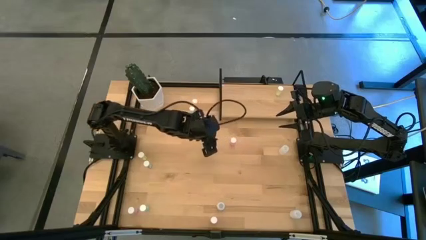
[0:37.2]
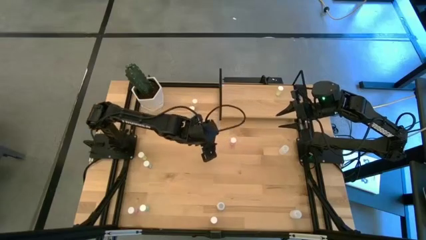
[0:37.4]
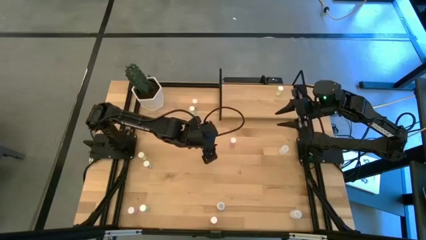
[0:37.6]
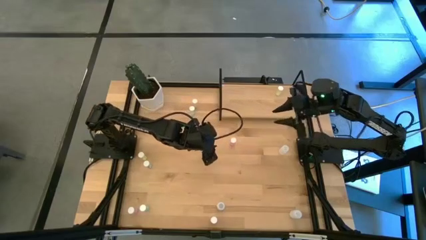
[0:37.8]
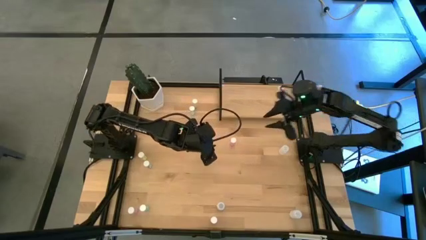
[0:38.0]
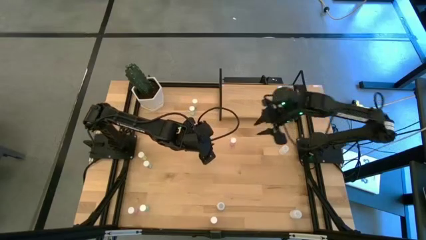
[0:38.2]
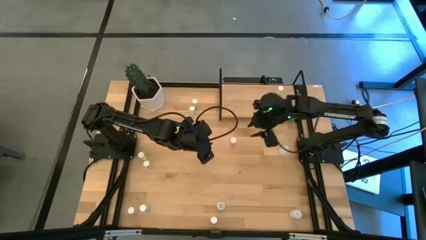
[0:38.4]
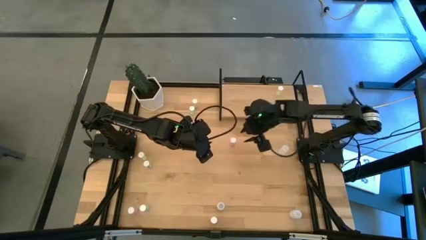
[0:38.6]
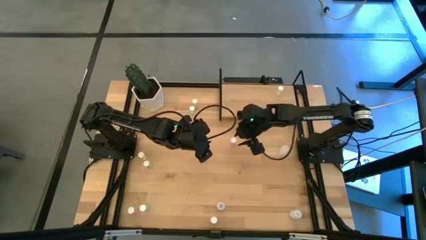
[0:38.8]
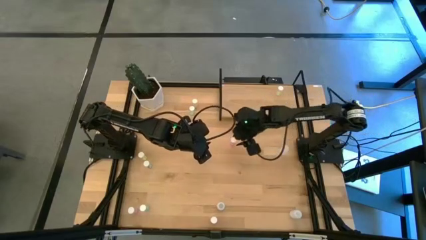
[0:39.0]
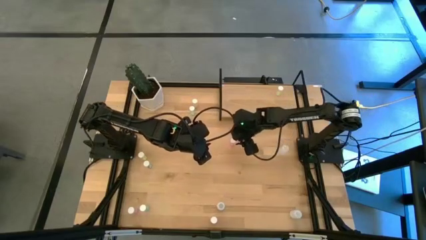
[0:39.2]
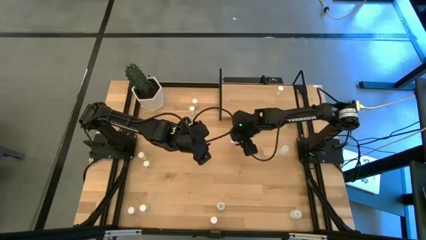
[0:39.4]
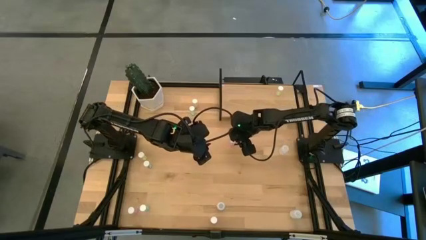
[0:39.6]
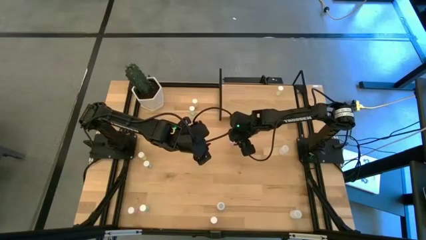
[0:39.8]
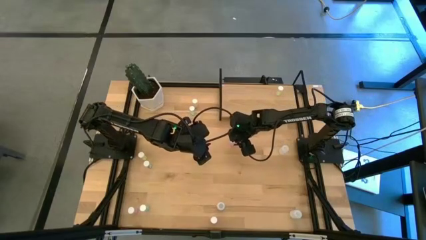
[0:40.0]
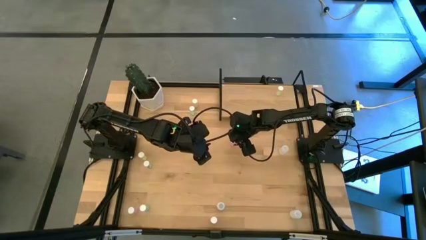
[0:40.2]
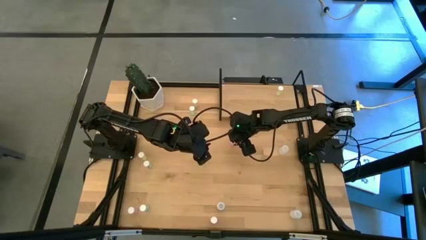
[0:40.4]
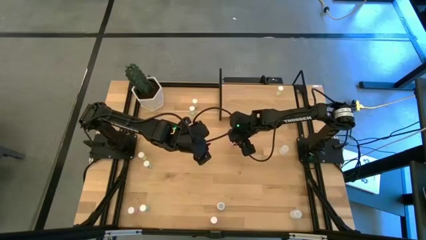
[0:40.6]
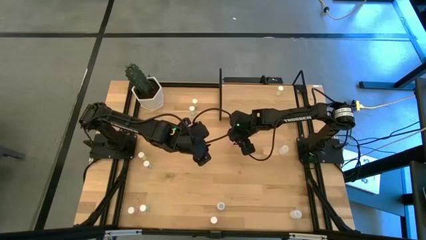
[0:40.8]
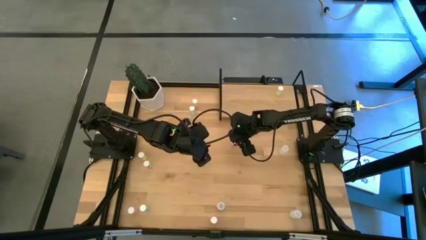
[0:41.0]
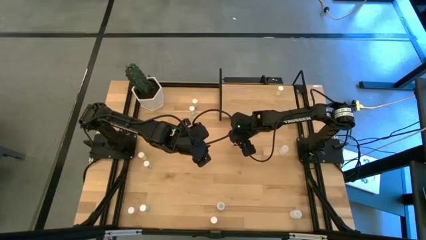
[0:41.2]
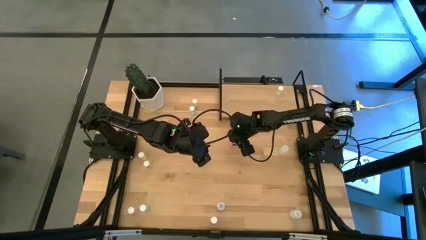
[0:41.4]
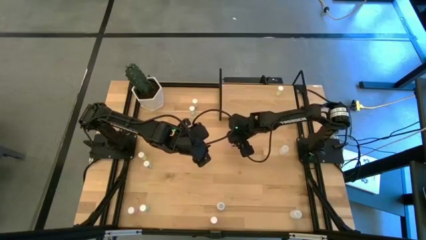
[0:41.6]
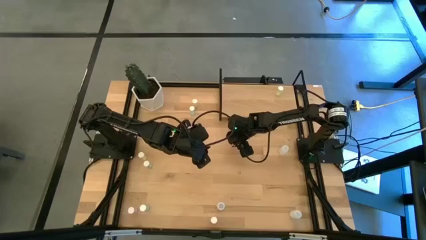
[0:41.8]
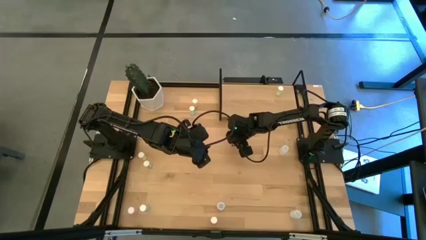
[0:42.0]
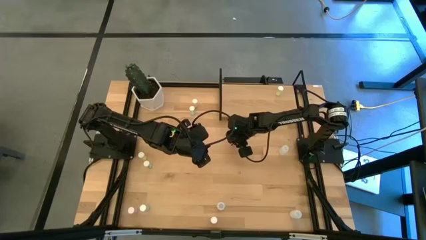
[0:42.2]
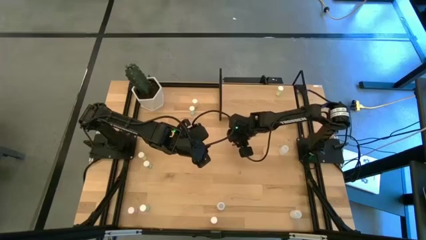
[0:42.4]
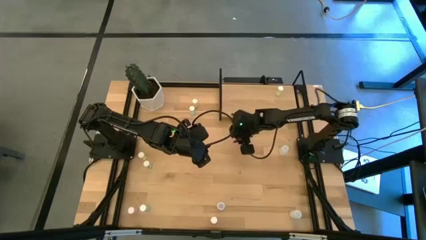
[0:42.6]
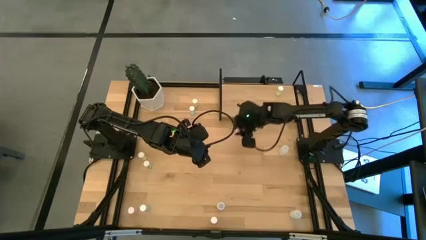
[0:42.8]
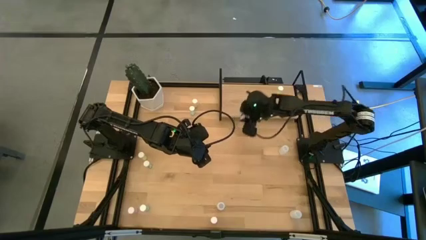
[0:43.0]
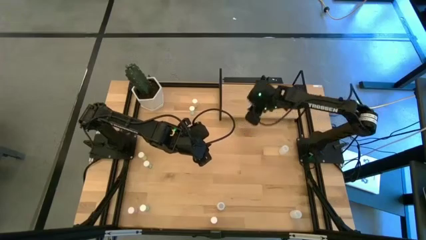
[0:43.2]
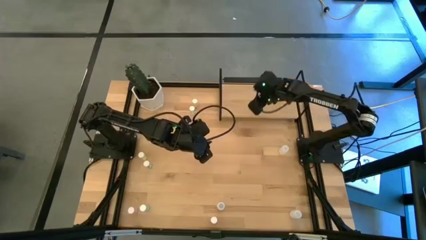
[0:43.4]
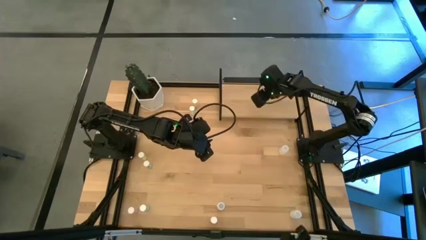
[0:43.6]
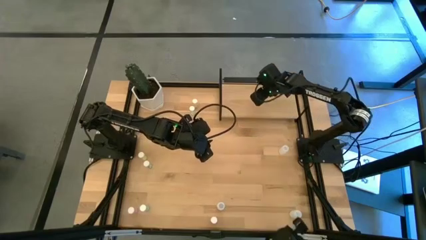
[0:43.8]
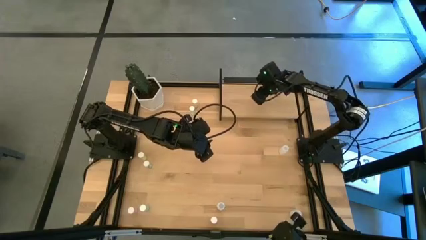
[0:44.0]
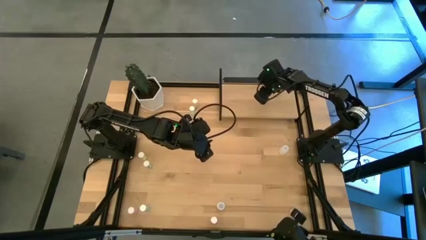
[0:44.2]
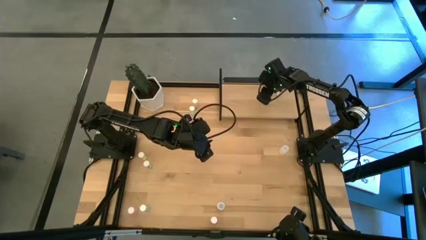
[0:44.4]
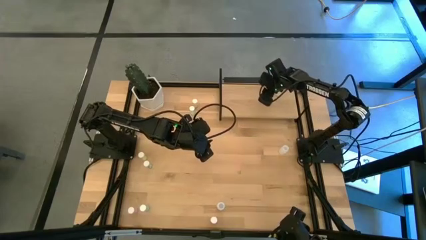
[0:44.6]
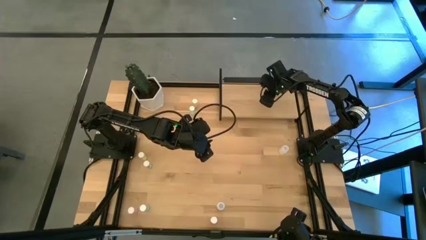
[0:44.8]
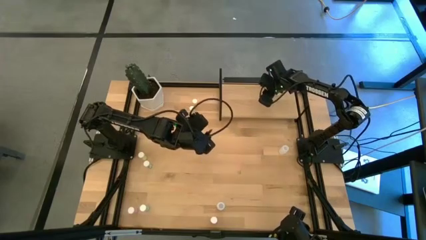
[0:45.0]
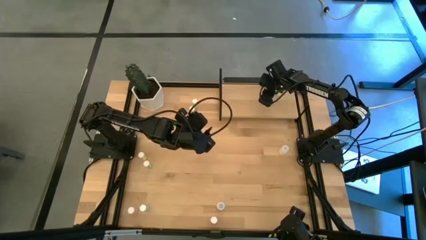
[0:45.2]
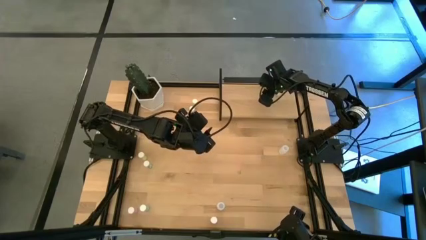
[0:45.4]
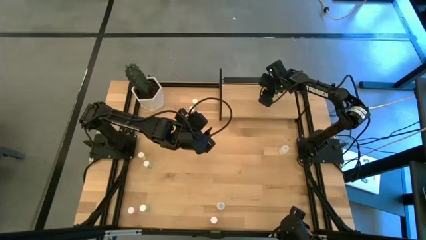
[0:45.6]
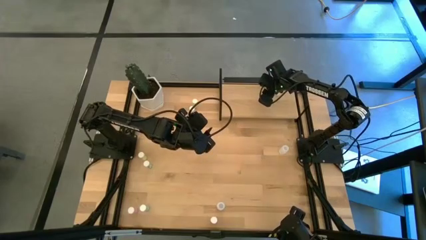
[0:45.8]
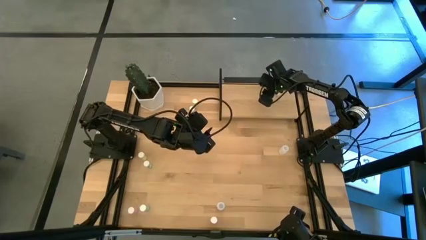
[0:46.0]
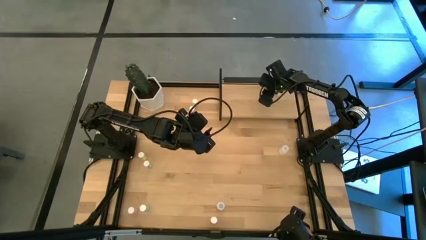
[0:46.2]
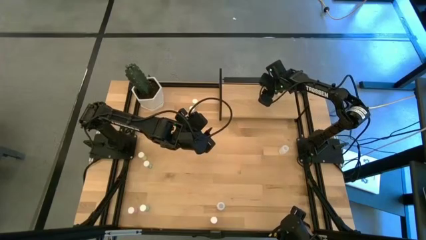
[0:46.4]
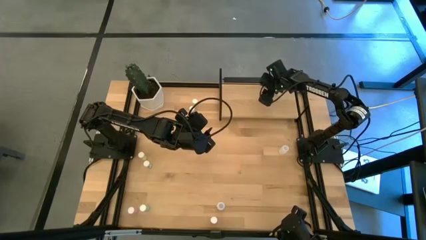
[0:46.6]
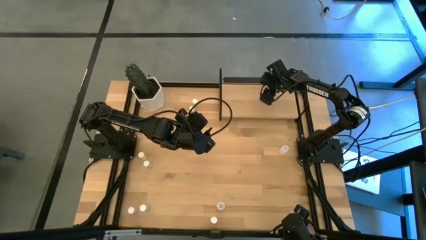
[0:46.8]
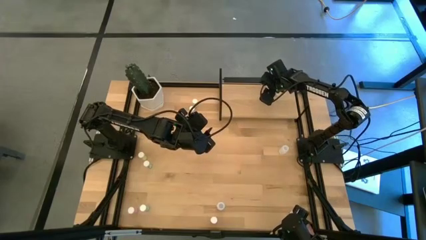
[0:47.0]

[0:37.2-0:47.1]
Task: Pick and place medicine bottles onto shelf by color
Put the top pink pill bottle on the shelf

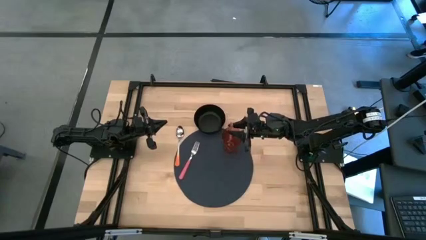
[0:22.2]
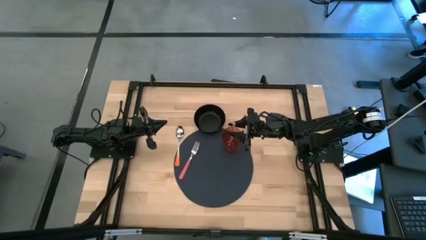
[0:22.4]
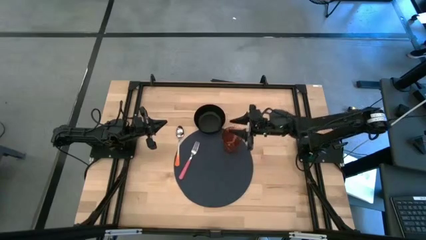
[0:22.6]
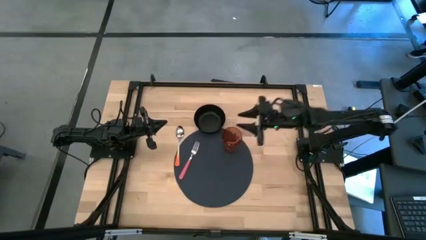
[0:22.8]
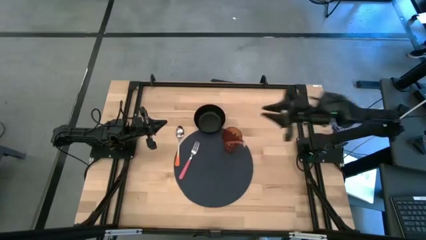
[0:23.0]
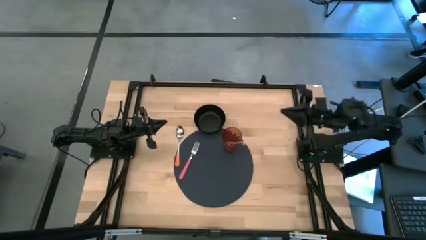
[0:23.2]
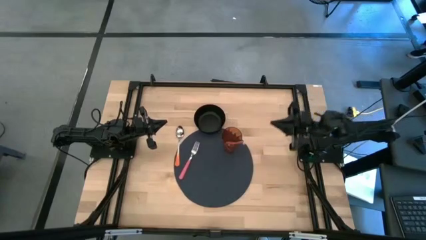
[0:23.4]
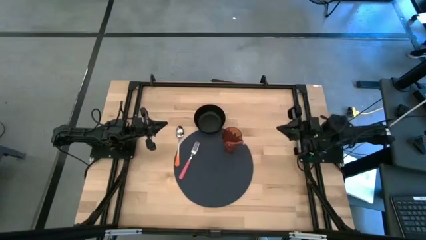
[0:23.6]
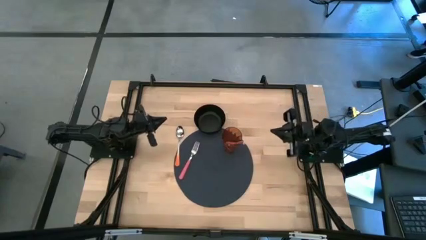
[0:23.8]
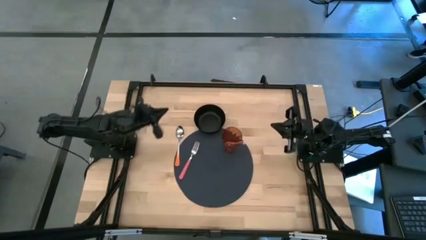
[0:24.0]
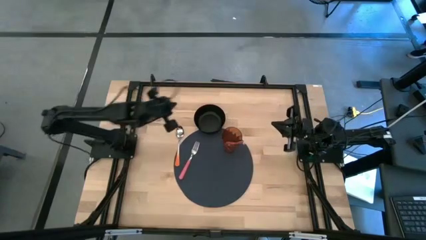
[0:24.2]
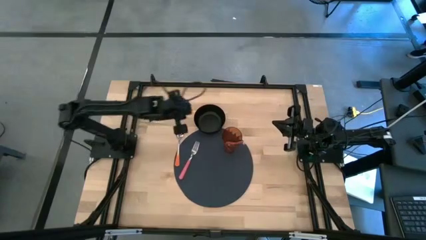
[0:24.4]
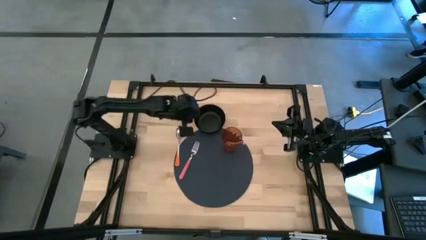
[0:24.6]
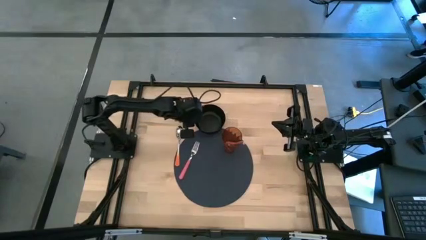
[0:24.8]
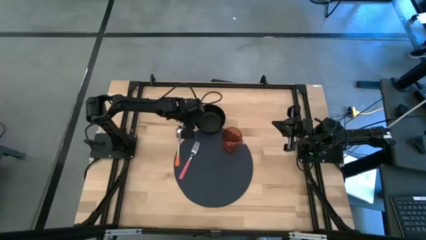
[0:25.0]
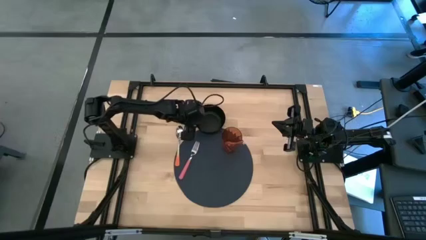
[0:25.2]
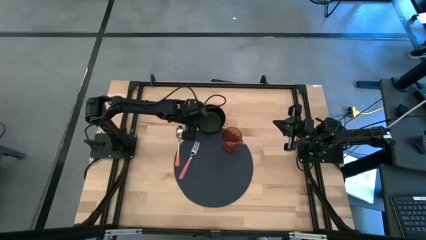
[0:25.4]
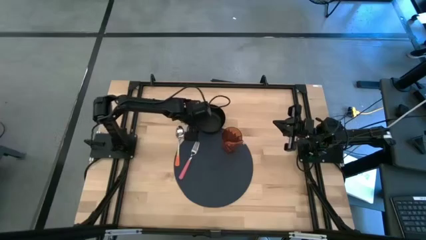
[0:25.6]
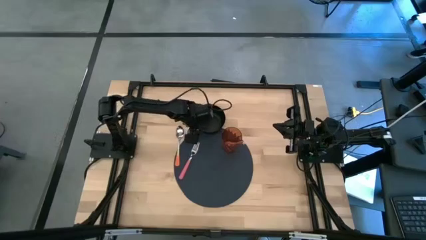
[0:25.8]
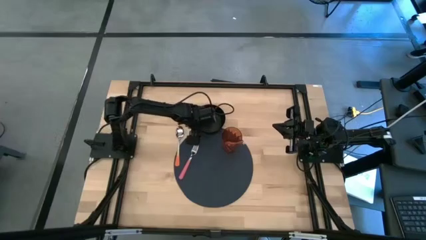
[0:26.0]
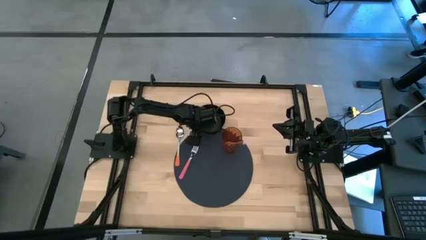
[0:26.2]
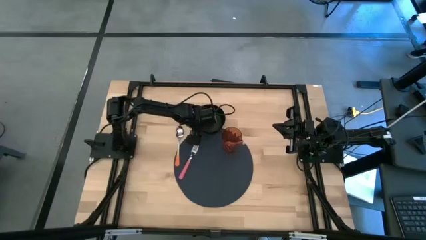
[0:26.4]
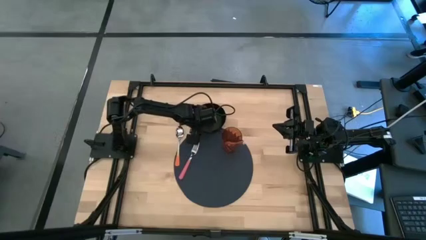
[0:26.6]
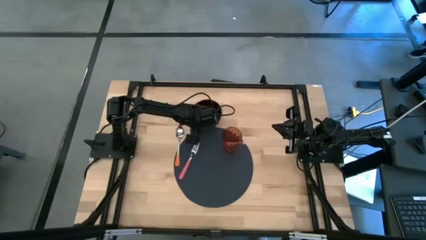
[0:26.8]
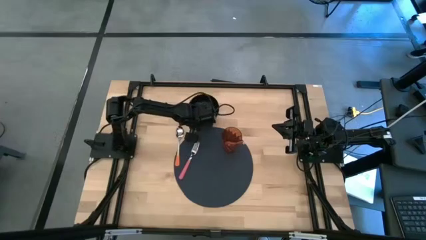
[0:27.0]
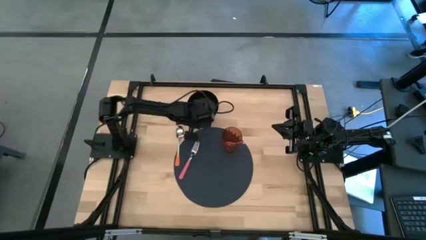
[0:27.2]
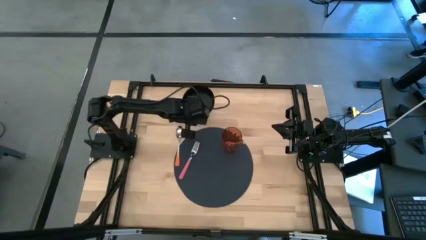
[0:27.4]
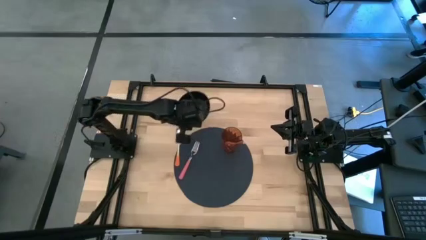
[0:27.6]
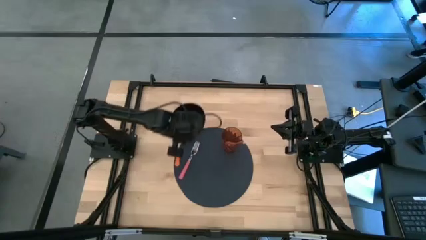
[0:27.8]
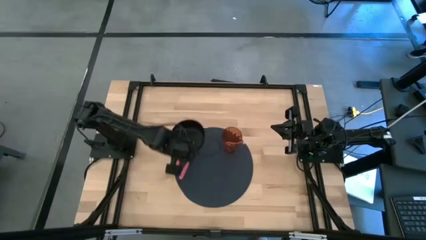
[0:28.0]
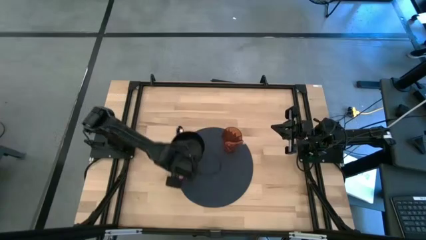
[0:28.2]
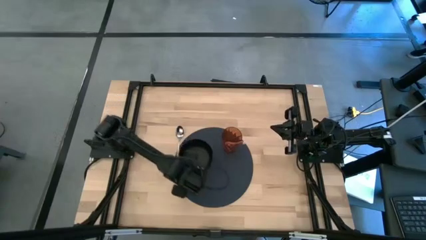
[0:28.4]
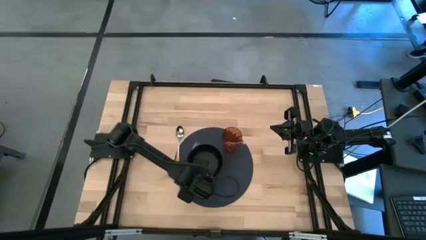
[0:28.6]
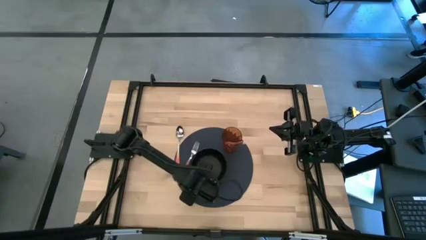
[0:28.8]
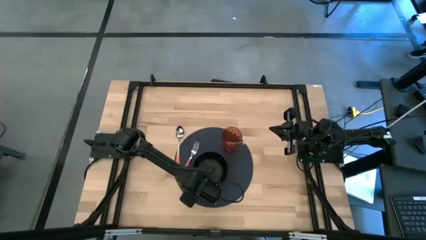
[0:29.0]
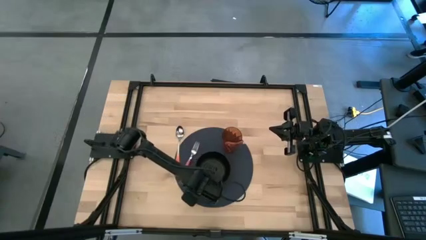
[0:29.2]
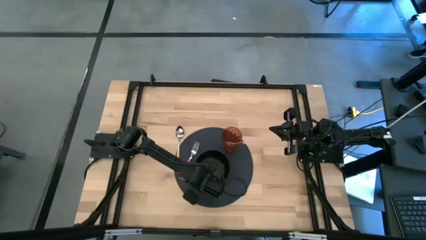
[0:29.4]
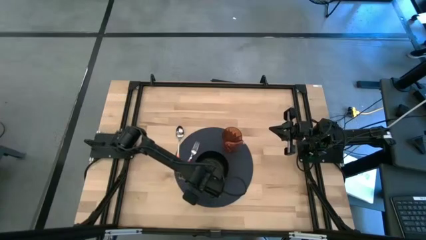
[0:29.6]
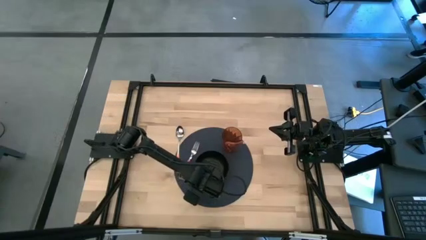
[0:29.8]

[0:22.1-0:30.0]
Task: Pick & Place Utensil
Put the black bowl on the black mat
